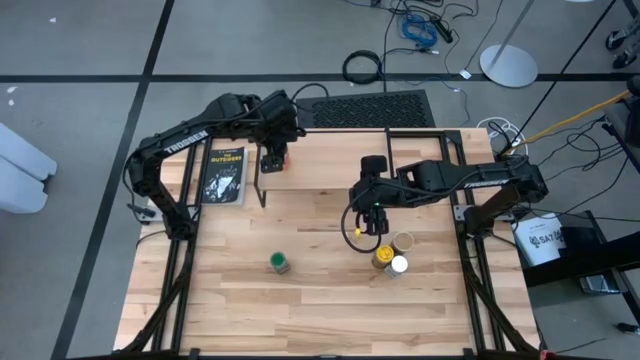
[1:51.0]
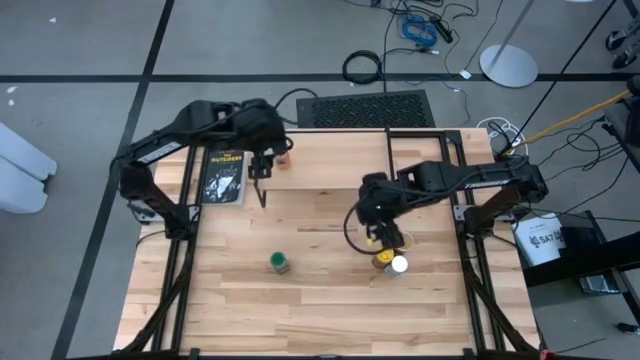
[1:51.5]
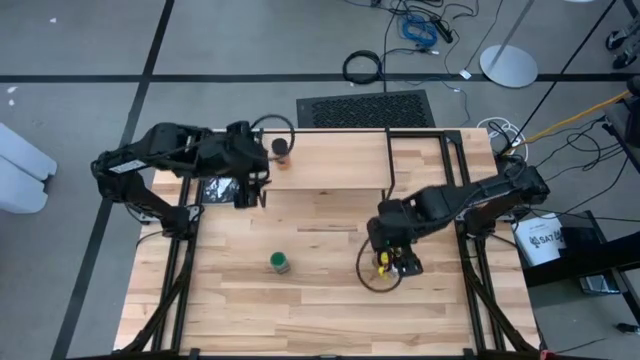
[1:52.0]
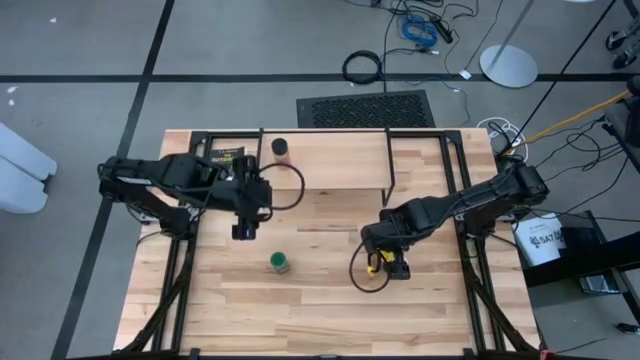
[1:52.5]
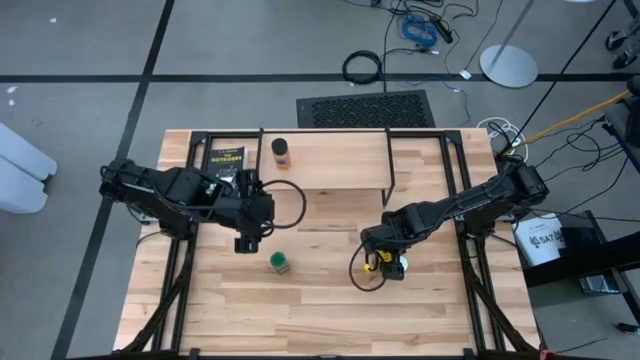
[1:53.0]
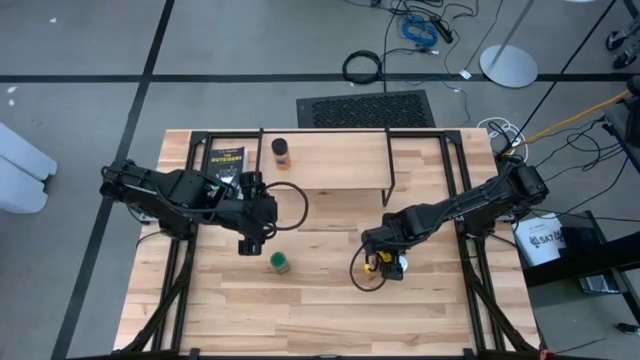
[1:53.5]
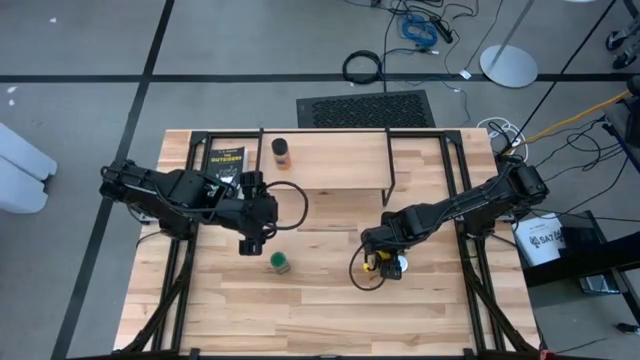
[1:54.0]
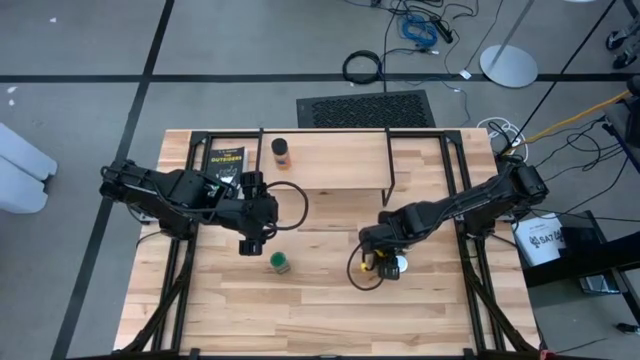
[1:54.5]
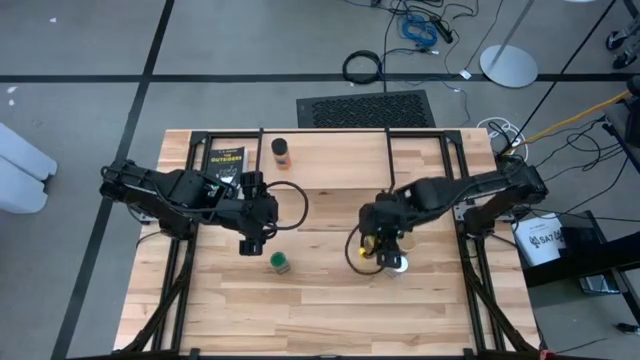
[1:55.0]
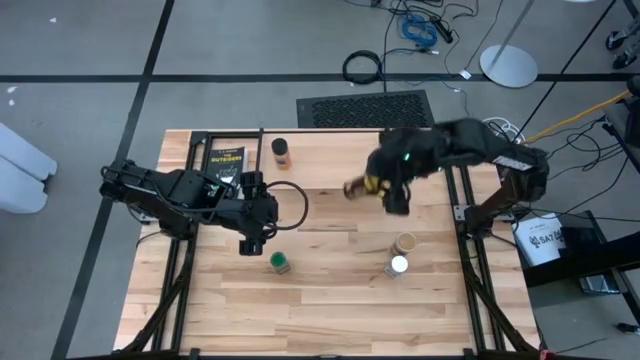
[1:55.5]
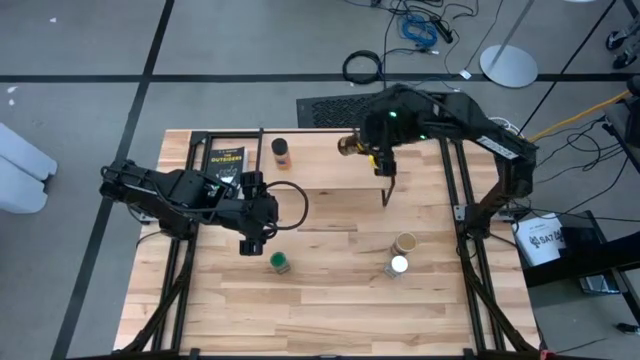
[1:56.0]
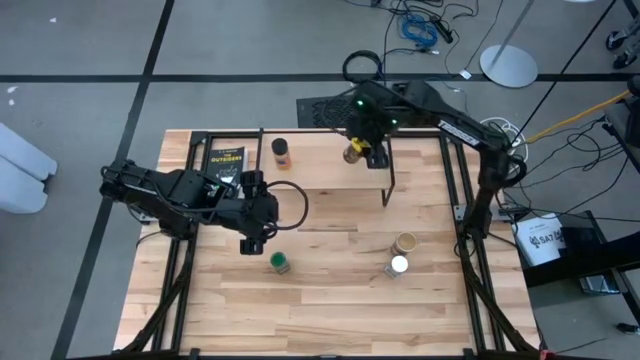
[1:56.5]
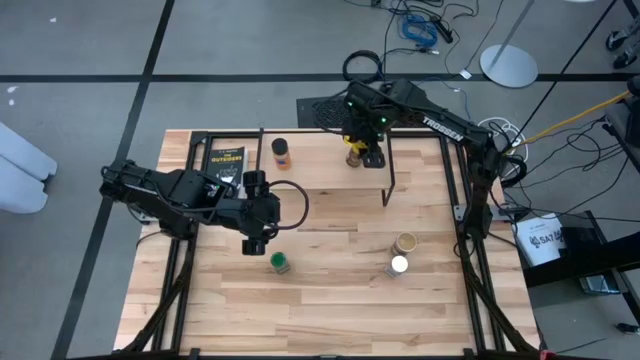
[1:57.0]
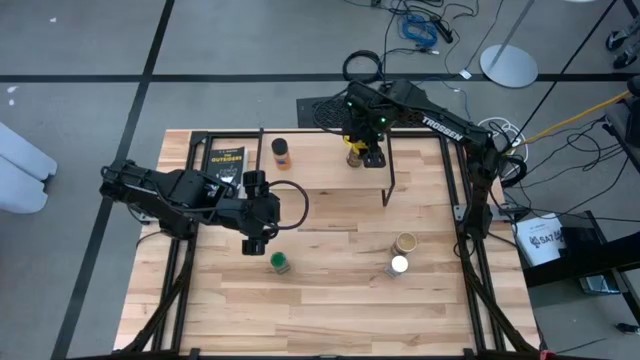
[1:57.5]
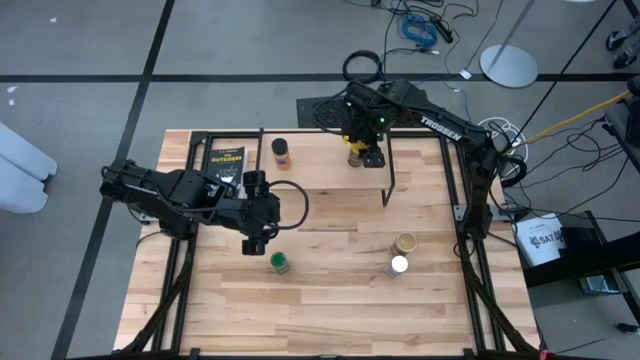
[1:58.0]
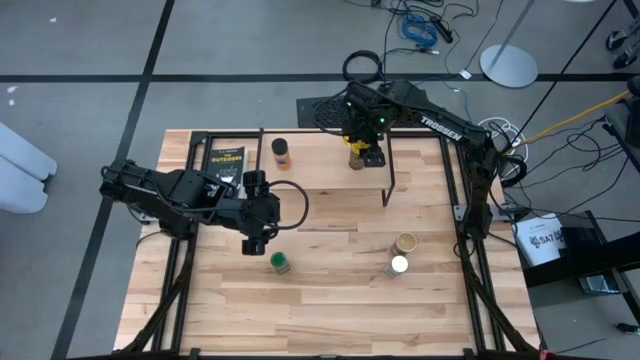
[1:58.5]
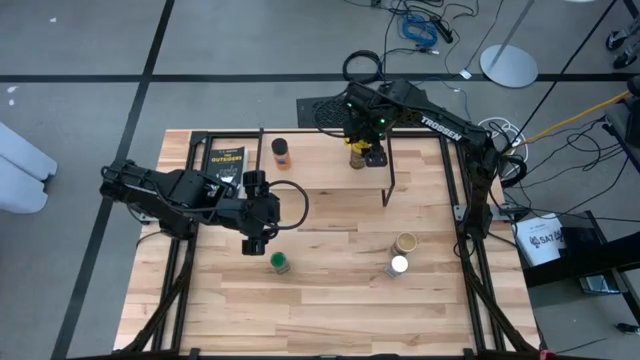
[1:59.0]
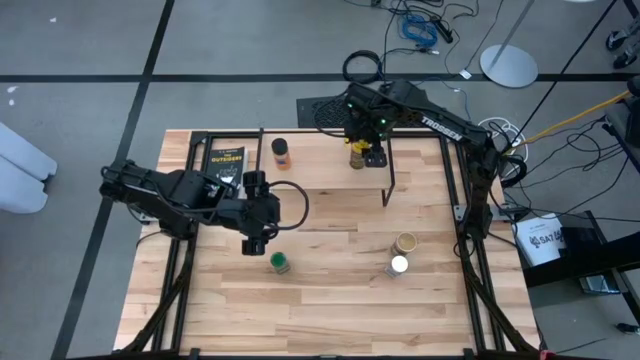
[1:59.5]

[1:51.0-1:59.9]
Task: Shelf spices
Put the yellow seasoning bottle on the shelf

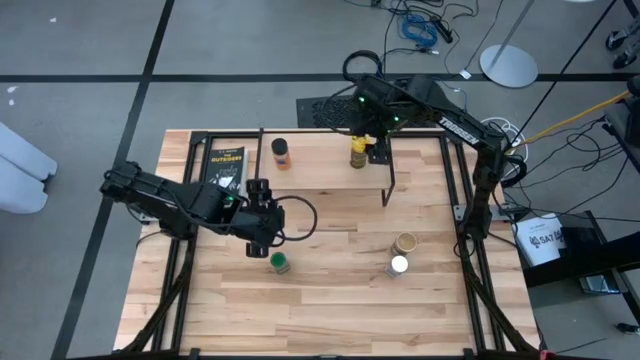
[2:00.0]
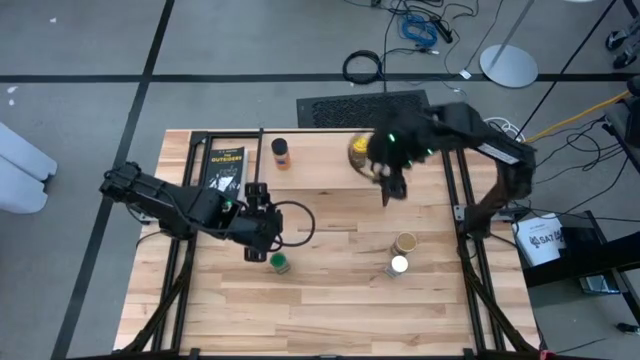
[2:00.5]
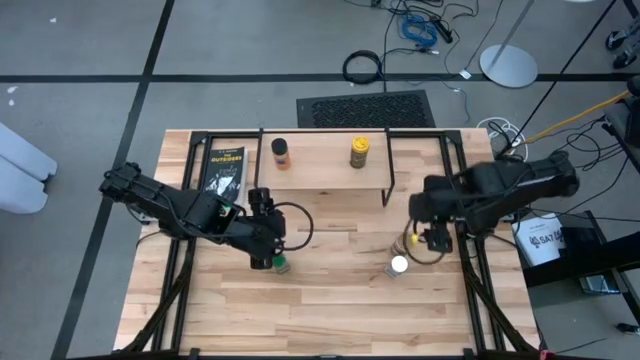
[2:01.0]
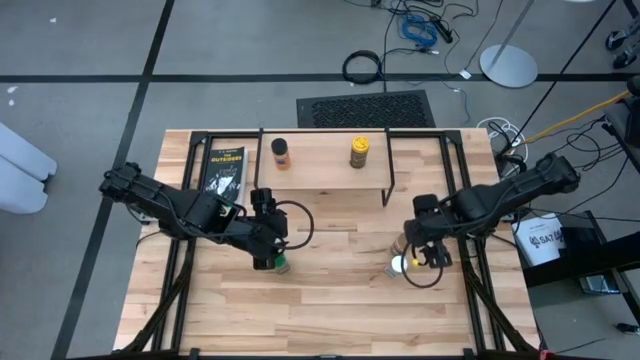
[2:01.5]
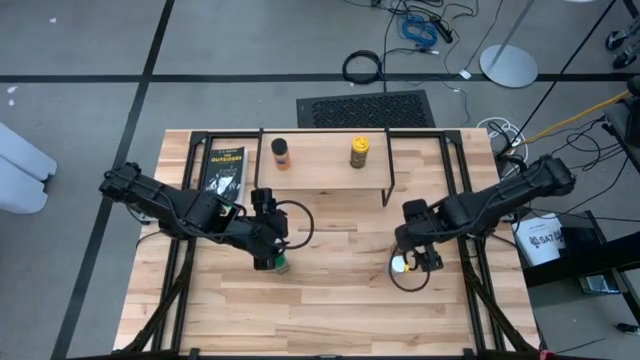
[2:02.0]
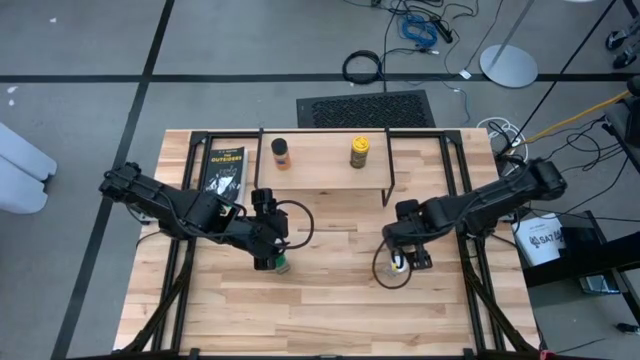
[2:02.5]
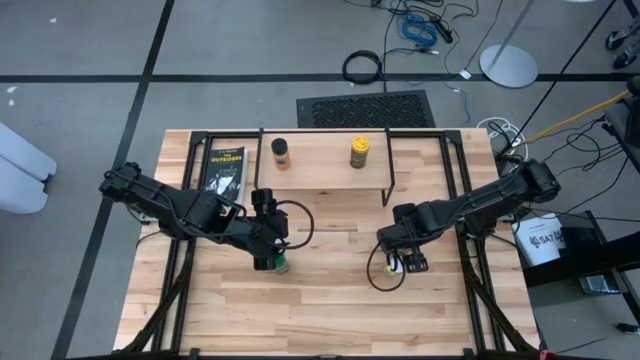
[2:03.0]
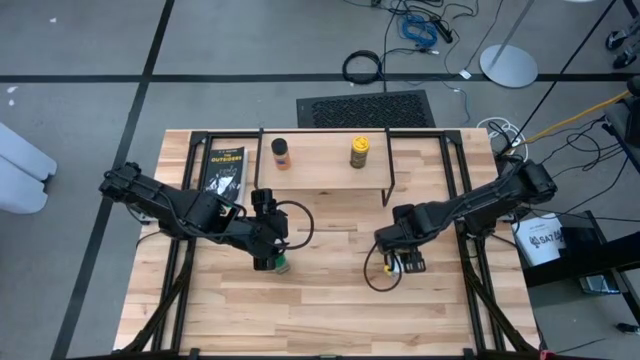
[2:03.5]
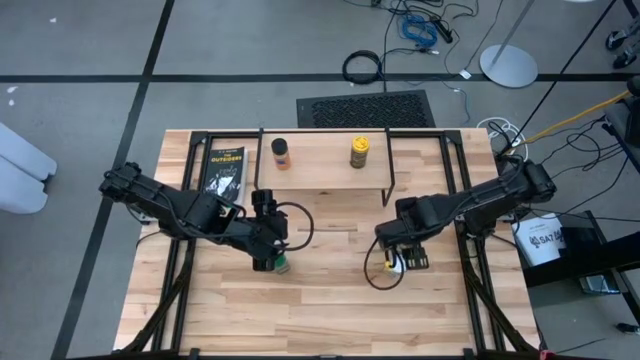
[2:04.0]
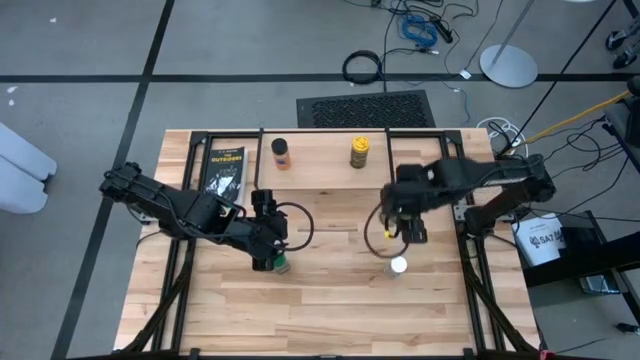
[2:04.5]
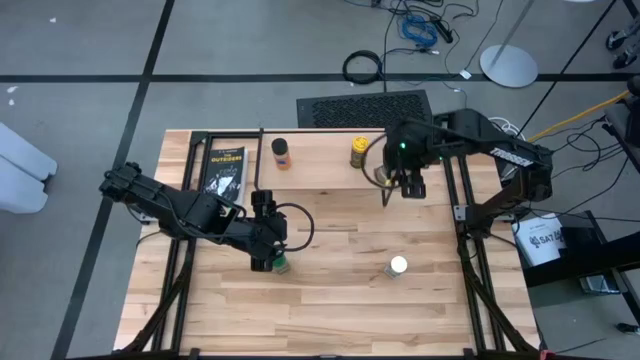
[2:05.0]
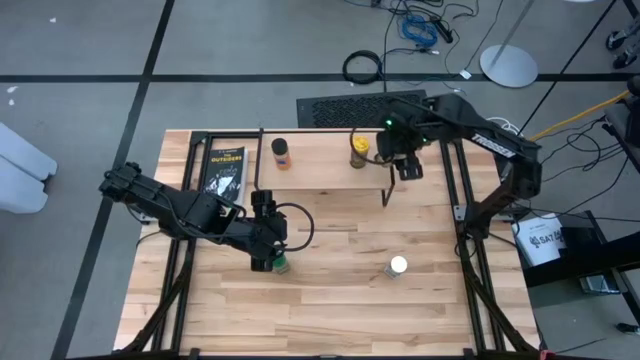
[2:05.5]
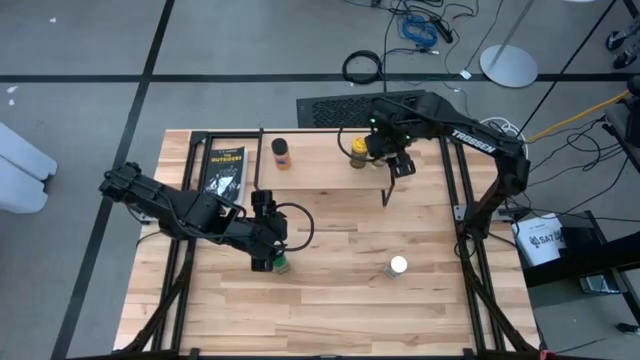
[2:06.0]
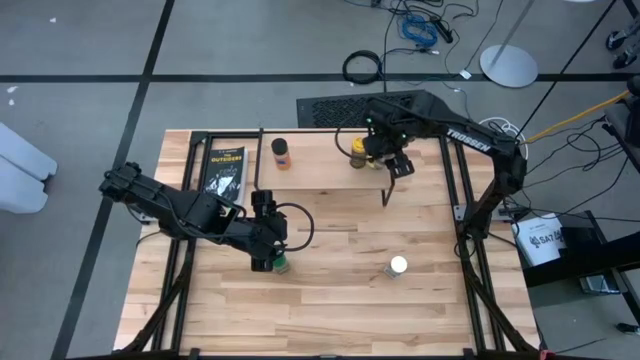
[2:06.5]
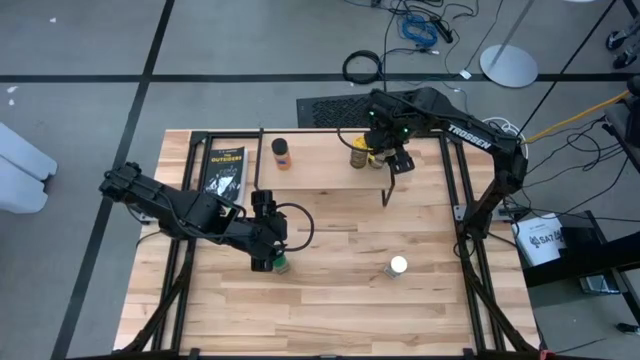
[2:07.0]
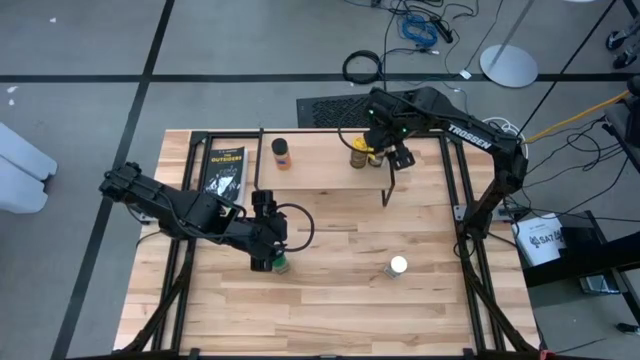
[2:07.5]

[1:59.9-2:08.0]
Put the brown seasoning bottle on the shelf
